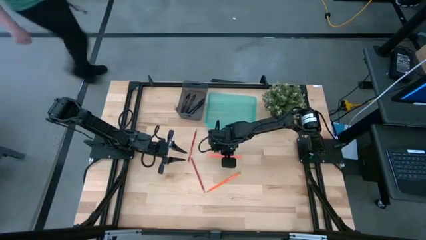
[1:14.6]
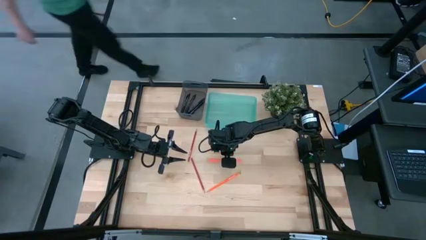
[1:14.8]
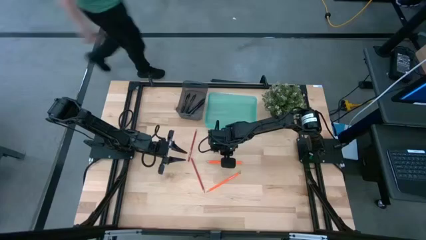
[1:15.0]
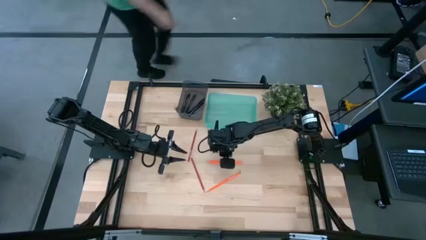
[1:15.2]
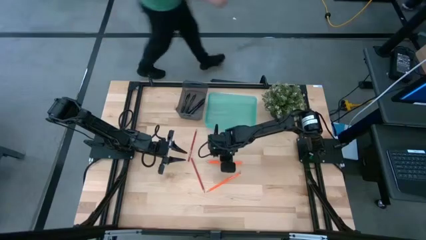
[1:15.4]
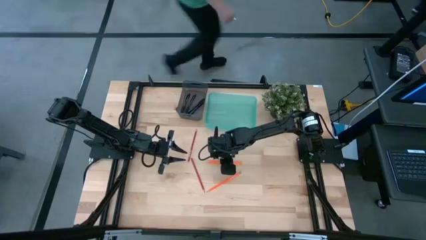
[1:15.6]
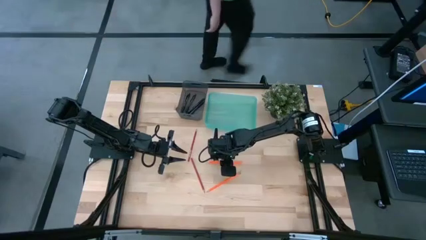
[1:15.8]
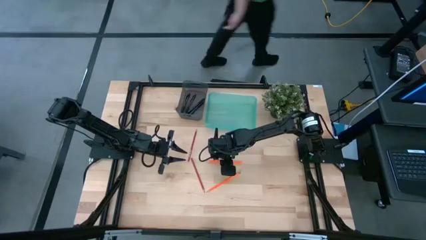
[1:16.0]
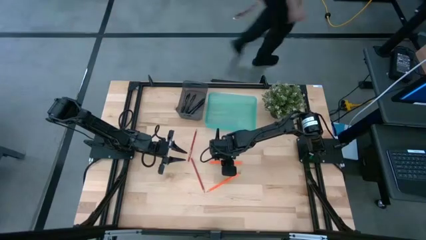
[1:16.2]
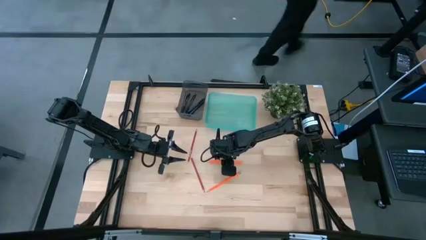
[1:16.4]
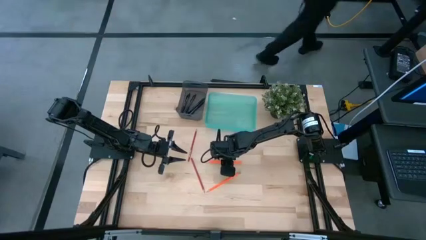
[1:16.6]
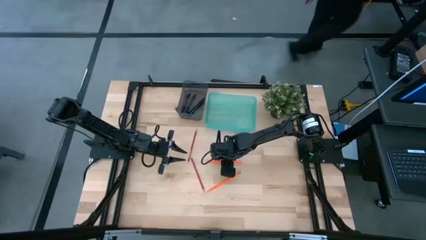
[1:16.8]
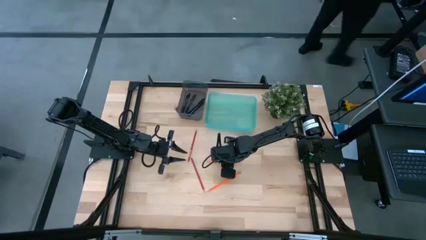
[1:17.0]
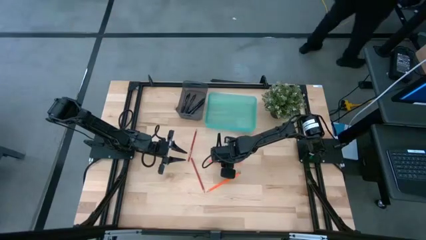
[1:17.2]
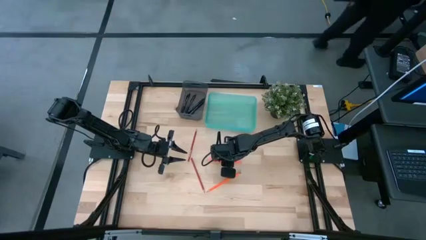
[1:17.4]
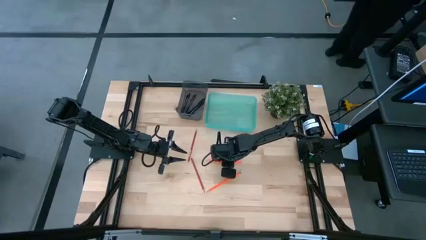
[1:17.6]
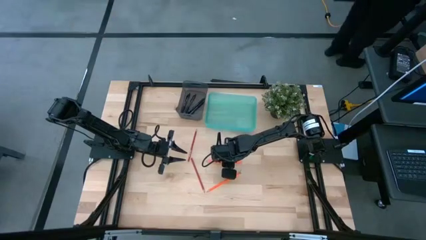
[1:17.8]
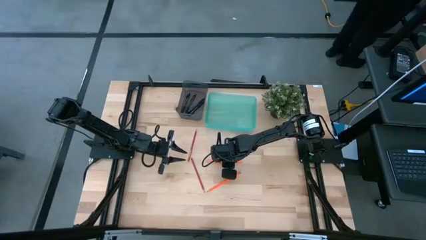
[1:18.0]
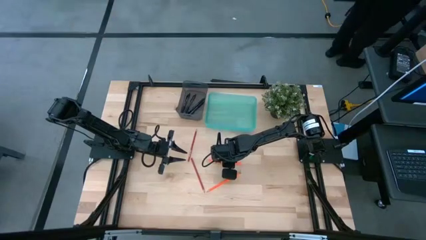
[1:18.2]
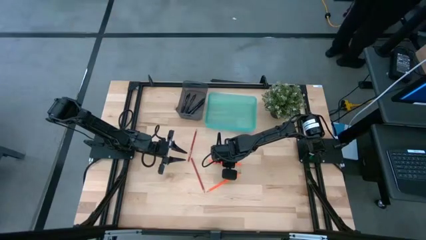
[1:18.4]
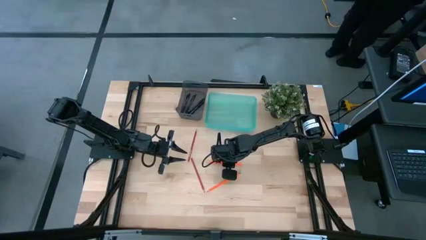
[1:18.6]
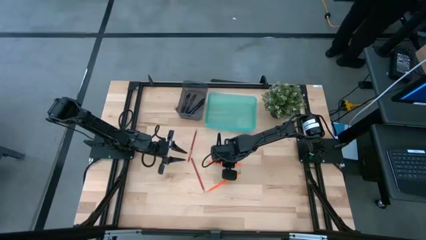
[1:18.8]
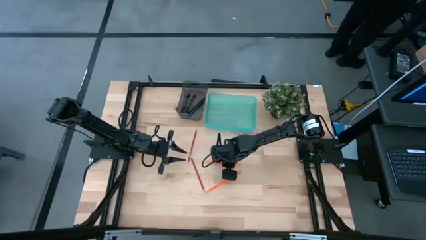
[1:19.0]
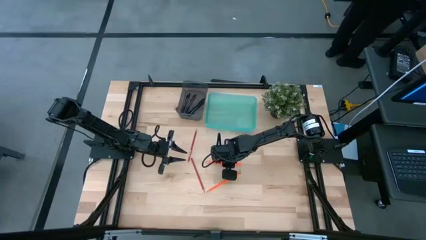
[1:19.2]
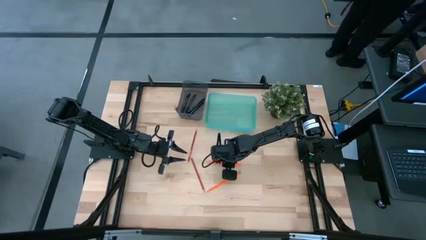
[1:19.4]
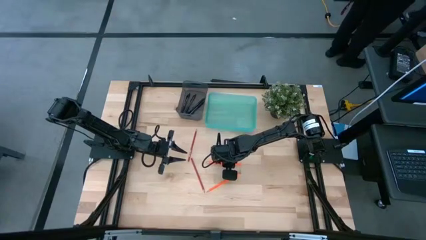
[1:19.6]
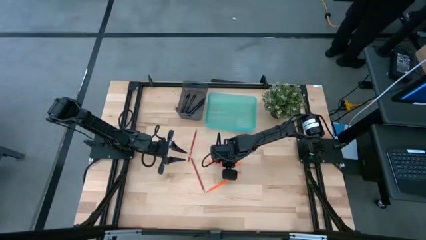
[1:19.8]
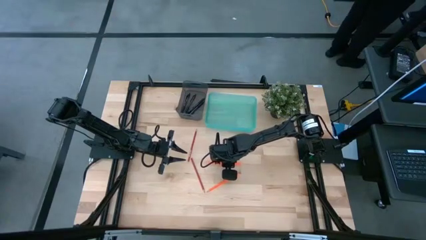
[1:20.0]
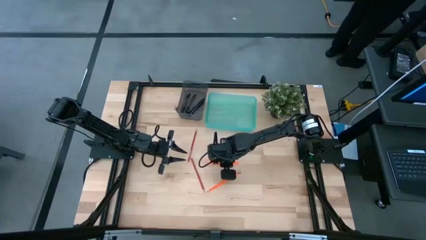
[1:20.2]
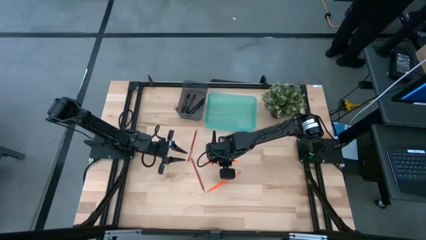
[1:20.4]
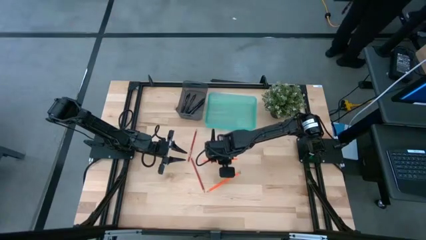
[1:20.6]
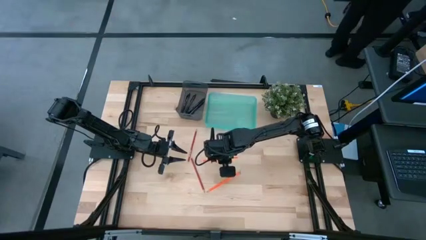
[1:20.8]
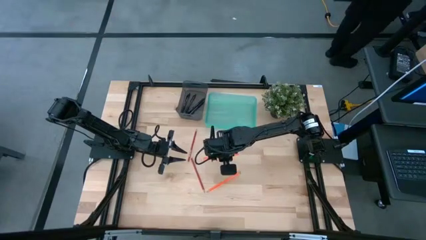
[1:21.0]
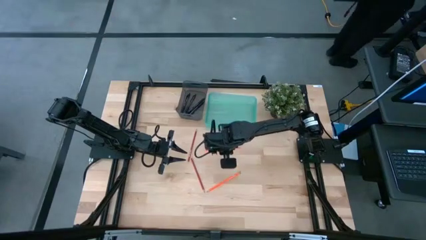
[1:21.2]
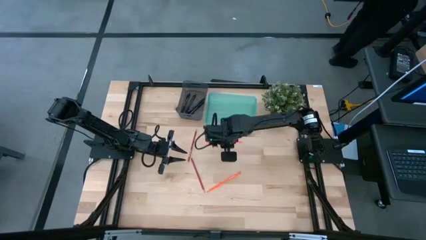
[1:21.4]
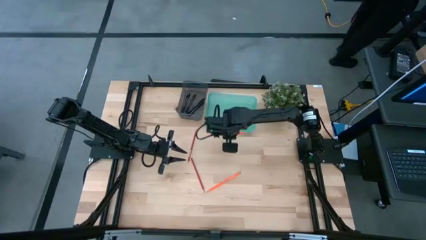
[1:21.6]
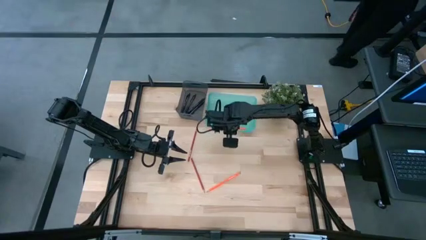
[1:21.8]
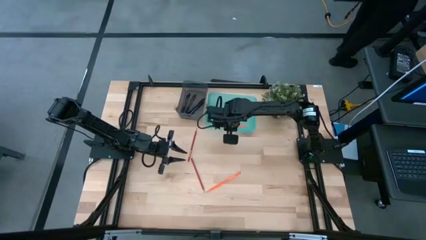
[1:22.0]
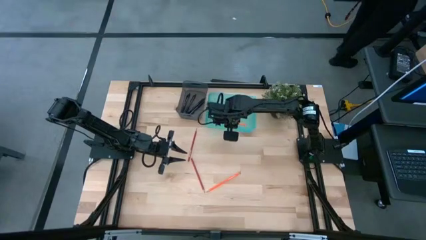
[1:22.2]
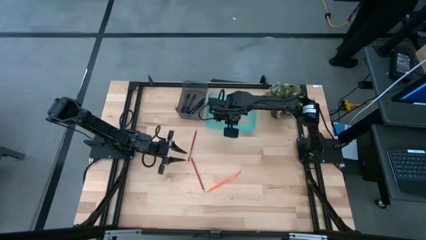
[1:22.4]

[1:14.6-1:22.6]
Task: Sort pens & pencils
Put the orange pencil into the green bin

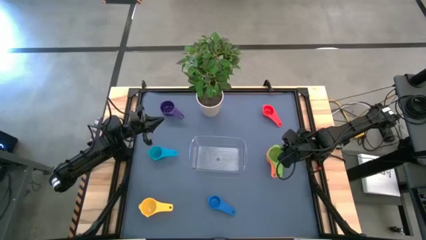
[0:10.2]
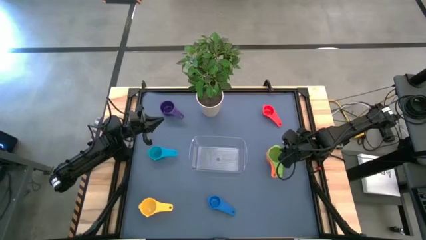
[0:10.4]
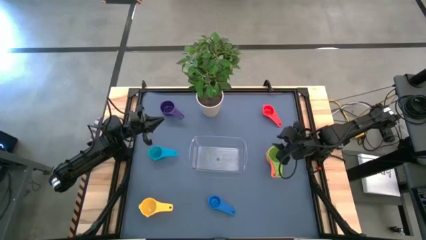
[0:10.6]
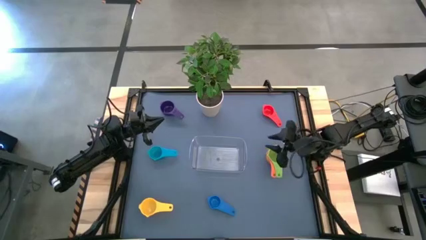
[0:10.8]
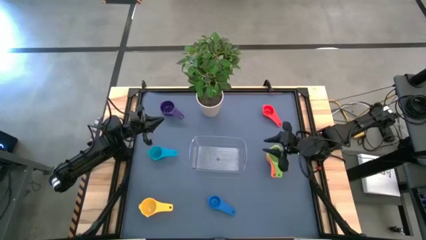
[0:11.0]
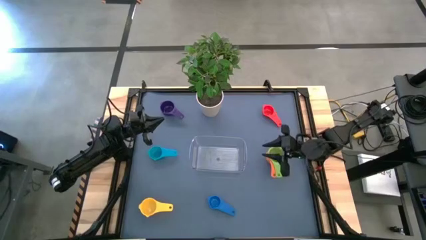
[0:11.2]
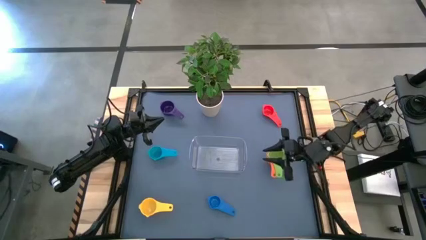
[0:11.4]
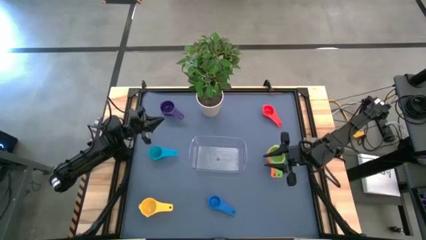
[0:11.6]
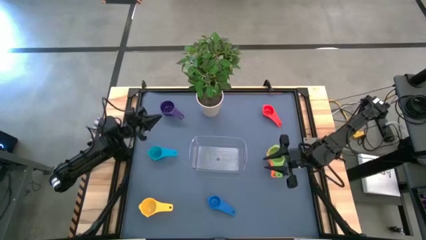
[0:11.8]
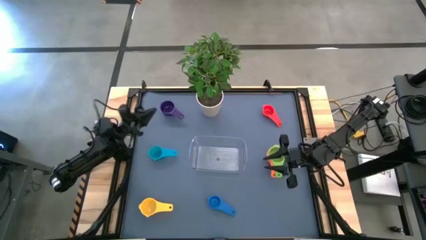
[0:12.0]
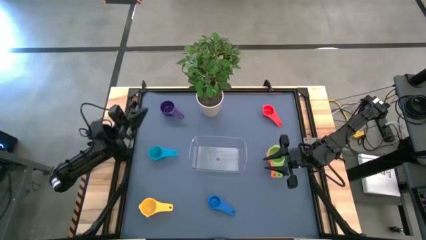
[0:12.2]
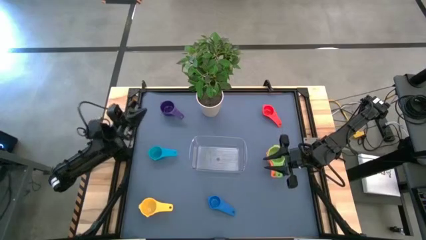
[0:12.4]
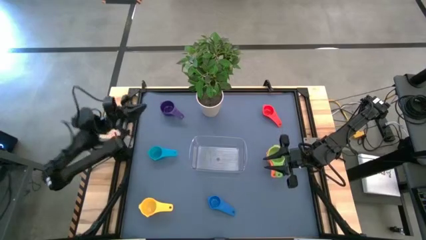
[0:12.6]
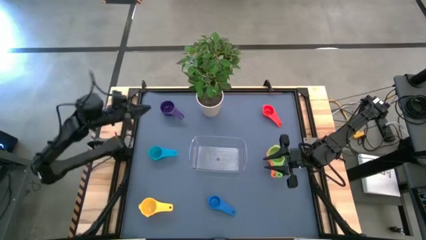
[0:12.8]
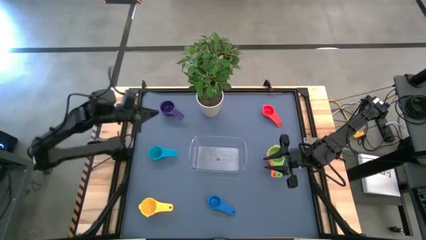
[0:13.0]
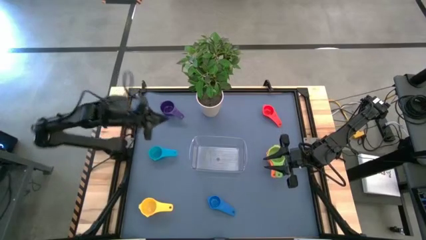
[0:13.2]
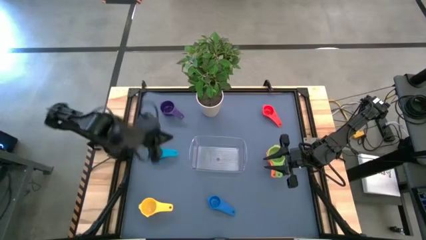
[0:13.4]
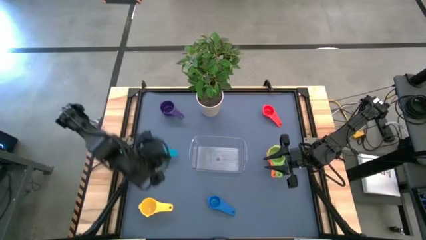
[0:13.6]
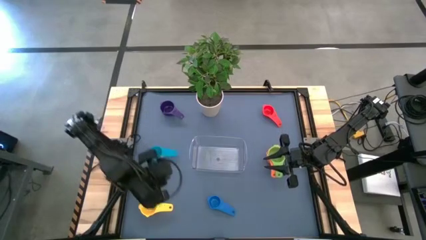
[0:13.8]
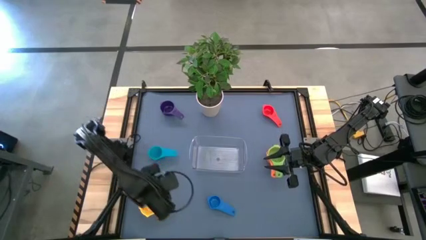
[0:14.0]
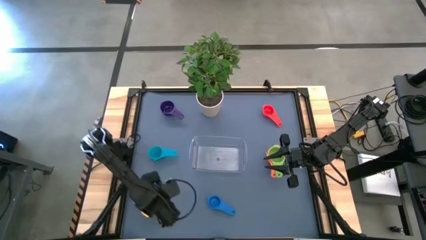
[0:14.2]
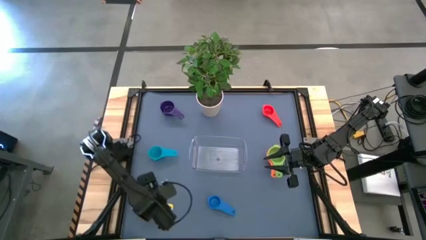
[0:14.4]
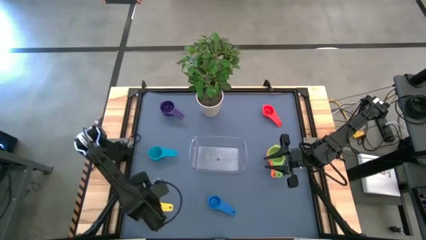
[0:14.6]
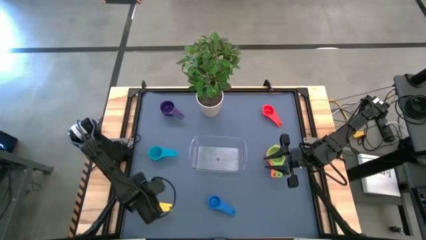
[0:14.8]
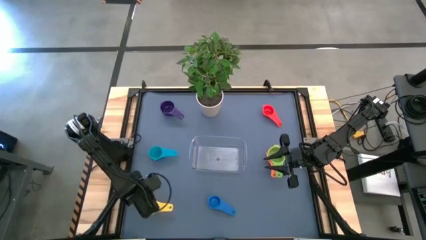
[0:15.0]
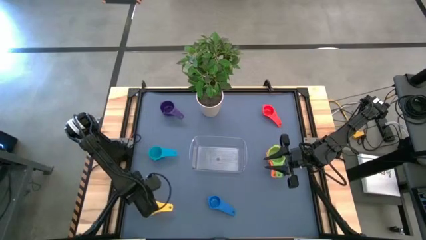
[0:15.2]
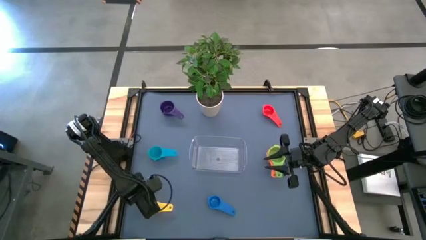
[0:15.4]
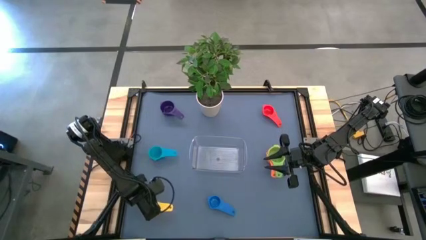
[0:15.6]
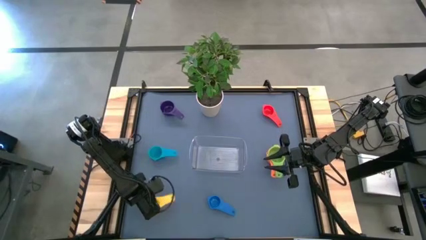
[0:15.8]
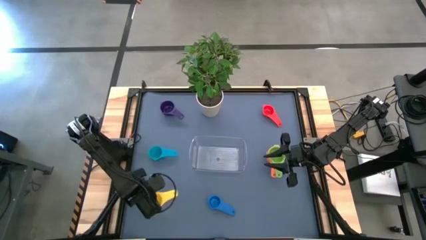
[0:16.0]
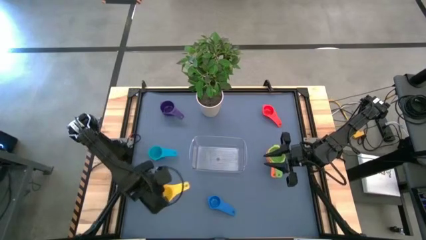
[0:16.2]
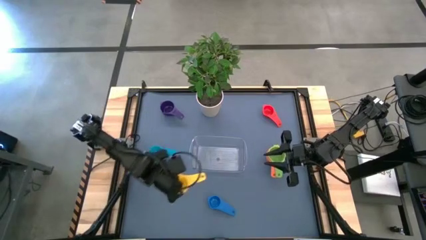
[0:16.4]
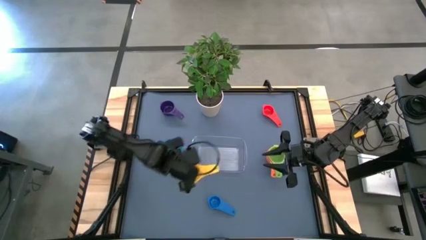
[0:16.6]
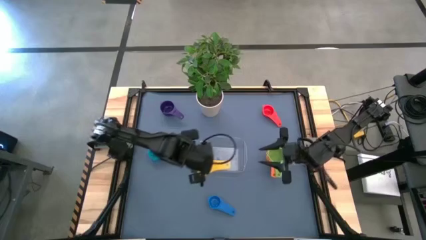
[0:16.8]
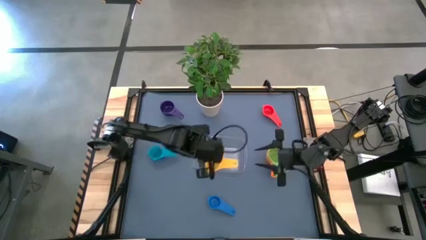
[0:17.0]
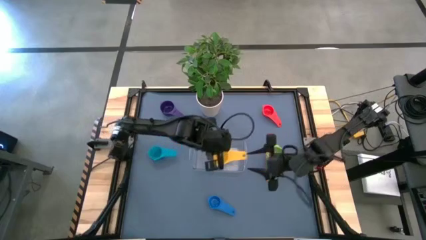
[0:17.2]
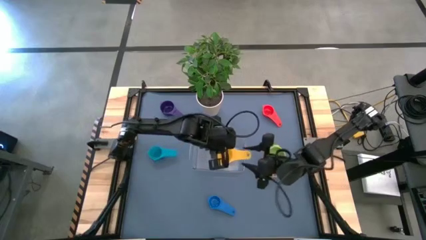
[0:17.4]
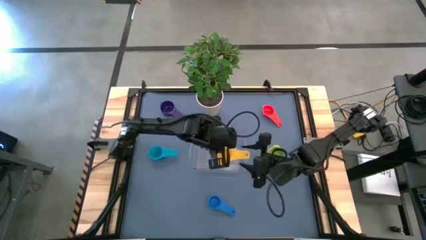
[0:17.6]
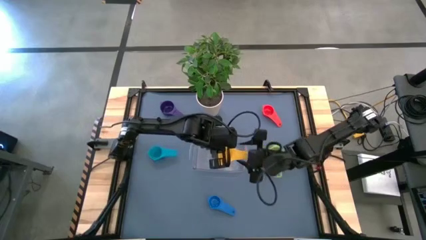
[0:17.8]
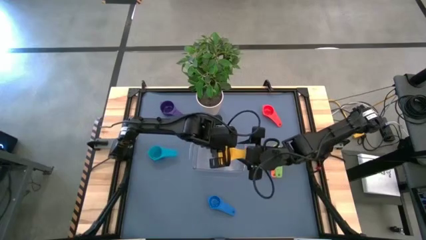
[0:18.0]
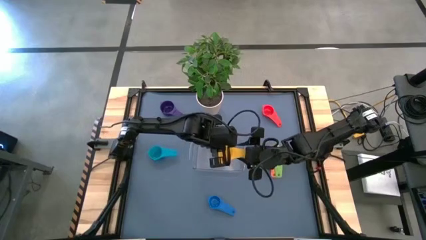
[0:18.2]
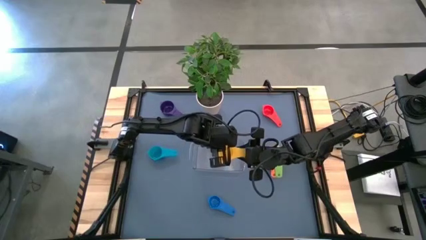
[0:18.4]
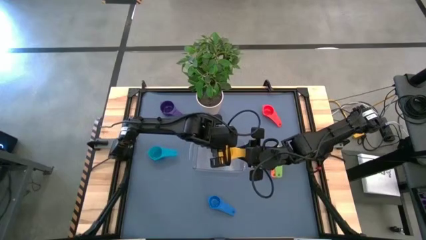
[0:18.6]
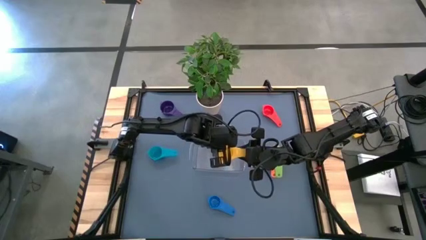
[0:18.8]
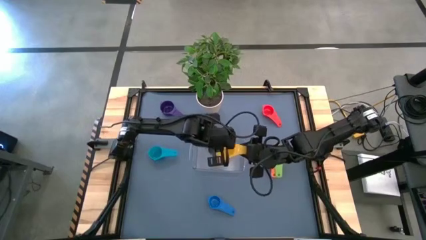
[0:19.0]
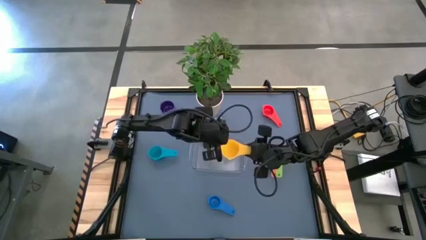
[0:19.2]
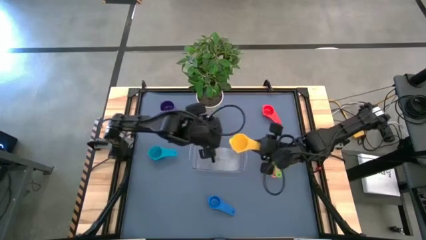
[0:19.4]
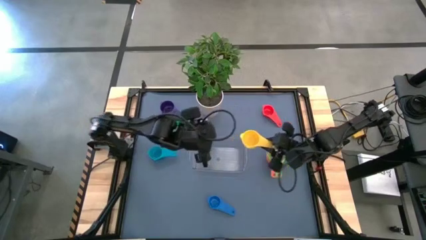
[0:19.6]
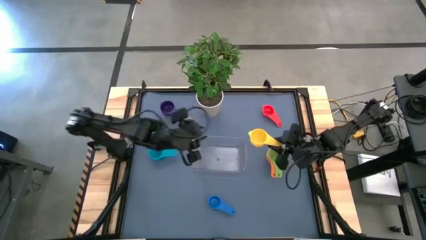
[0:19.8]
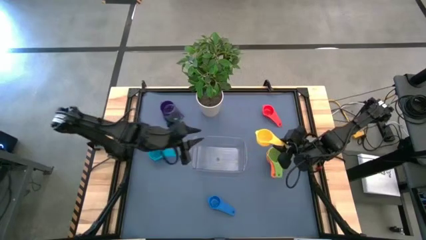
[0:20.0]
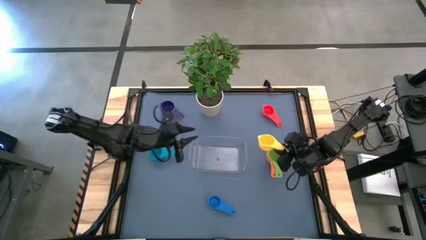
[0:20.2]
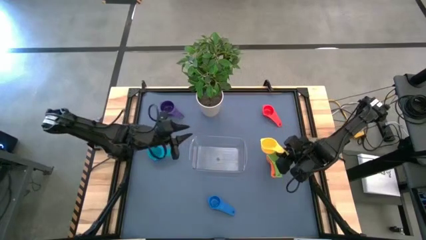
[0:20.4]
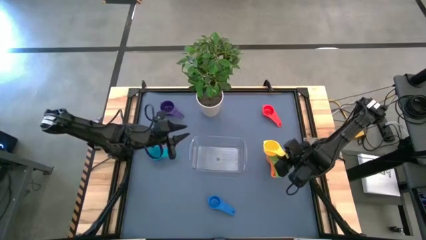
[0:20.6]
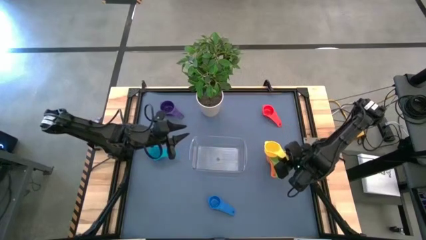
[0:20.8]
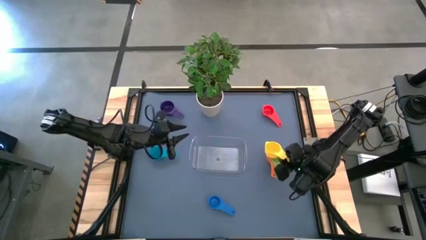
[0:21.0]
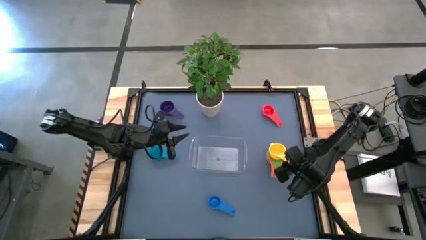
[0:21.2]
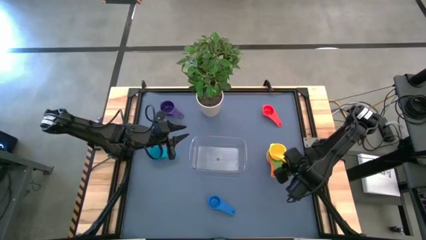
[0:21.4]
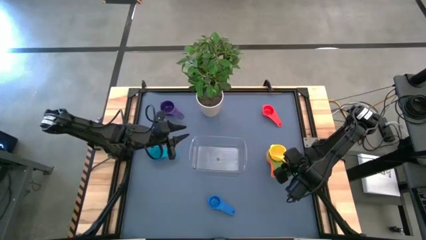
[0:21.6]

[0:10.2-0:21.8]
Task: Nest measuring cups in basket
Stack the yellow measuring cup on top of the green measuring cup
